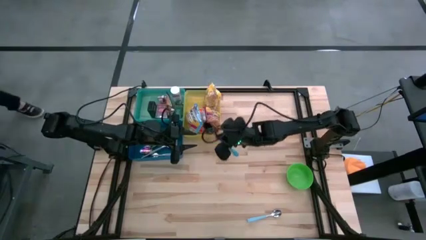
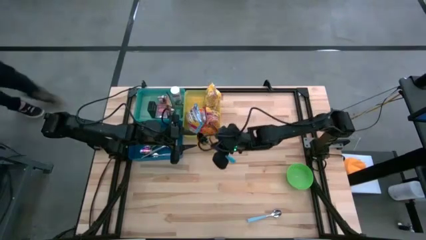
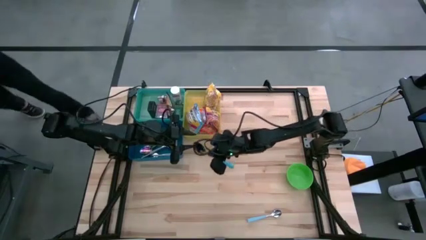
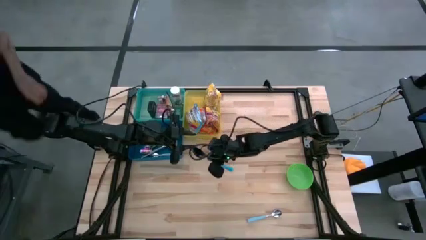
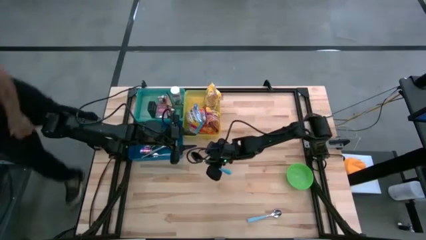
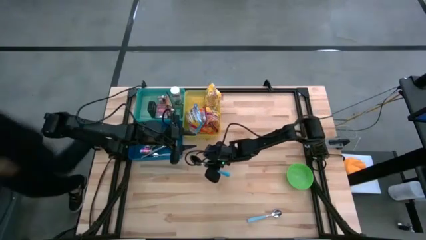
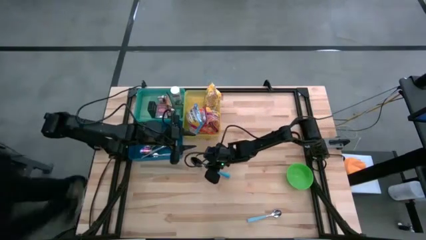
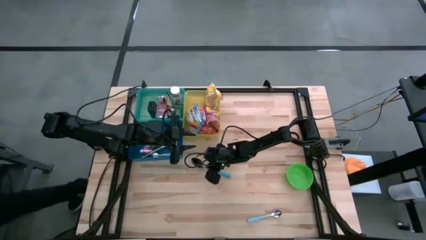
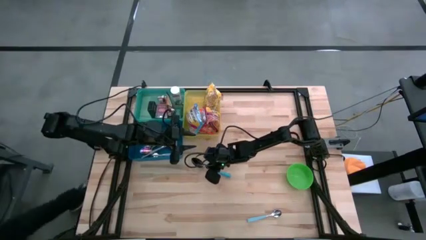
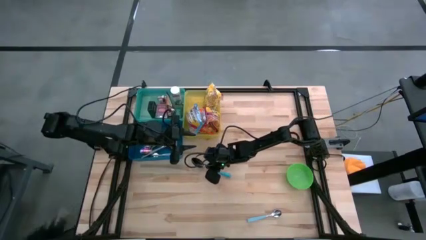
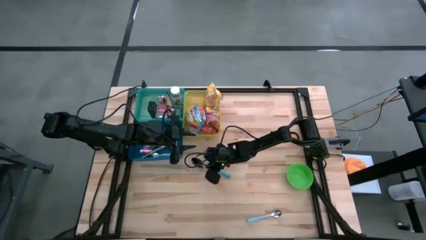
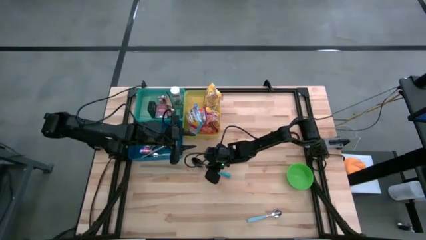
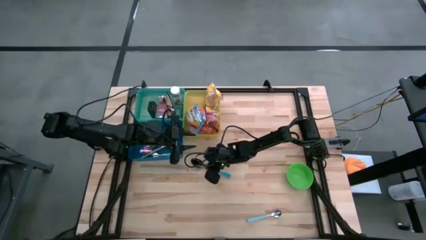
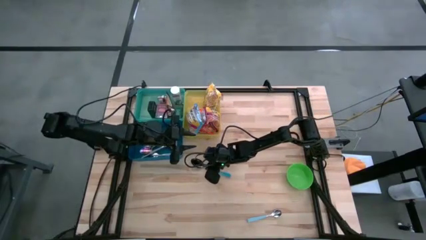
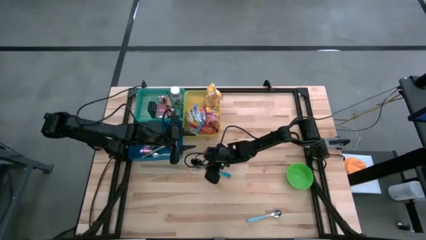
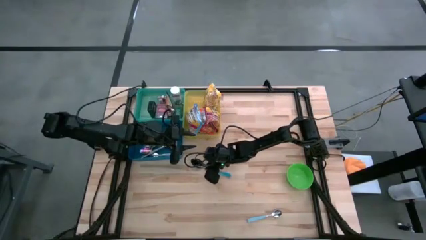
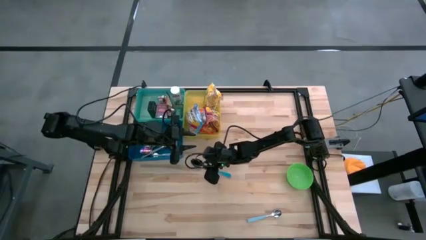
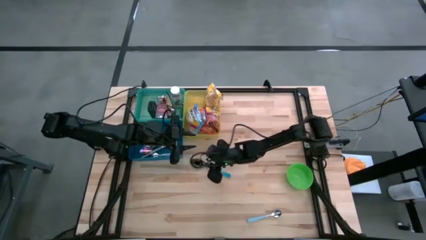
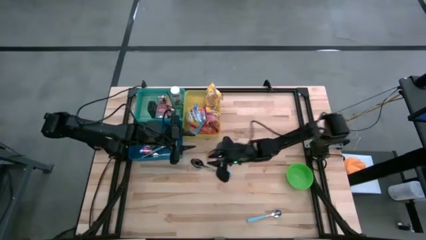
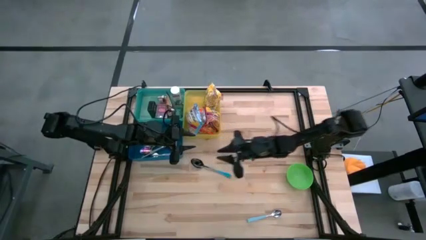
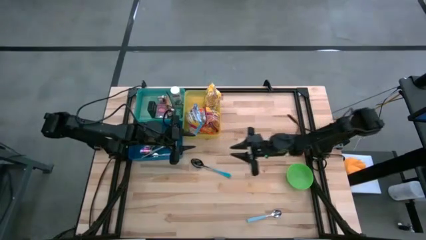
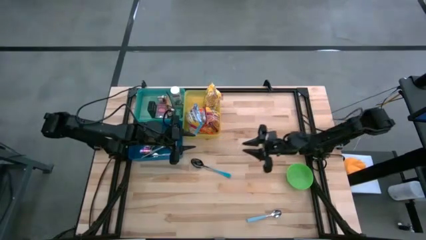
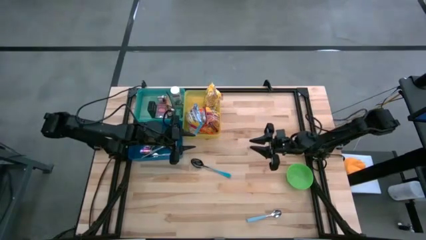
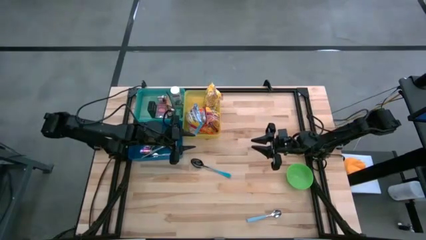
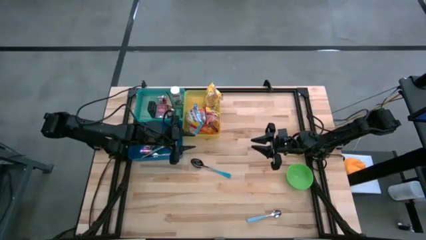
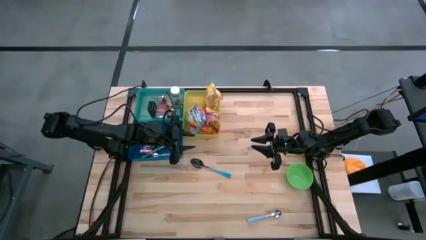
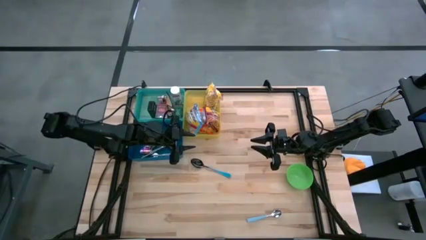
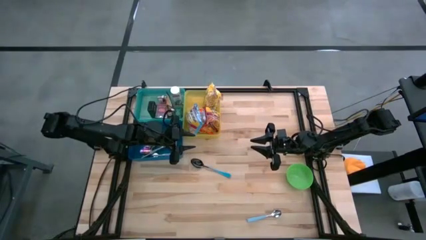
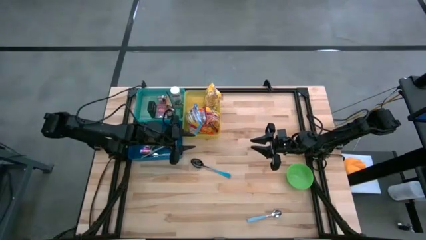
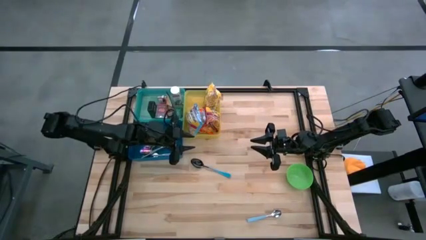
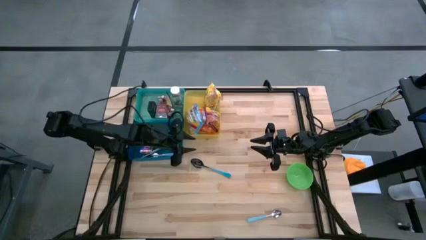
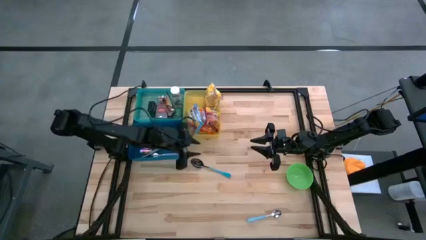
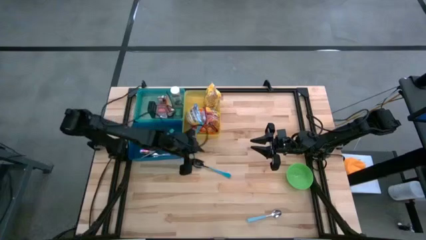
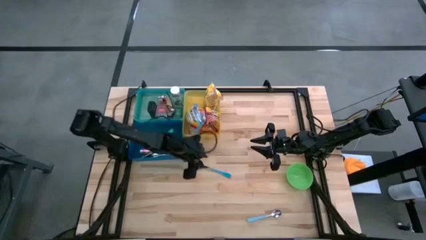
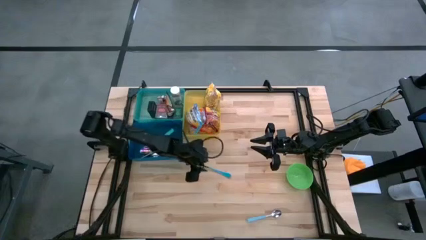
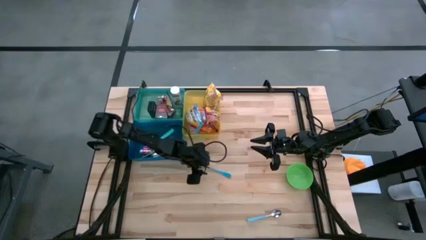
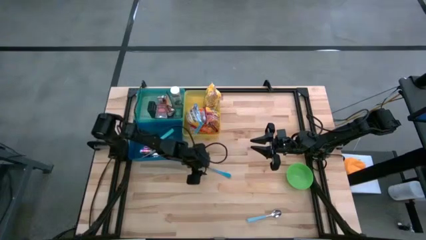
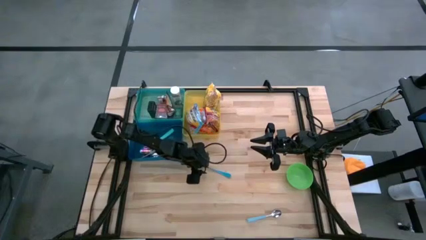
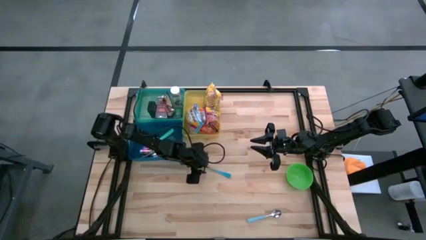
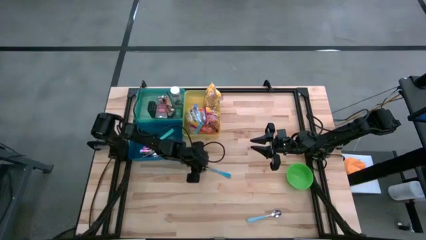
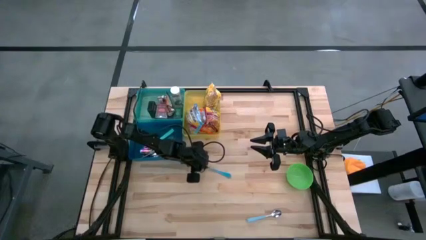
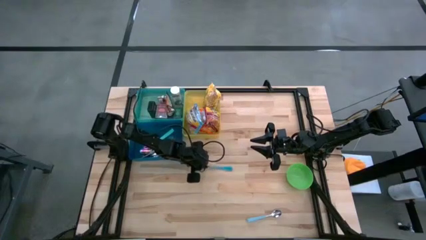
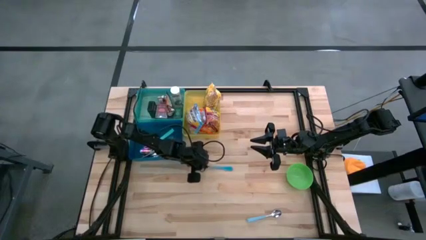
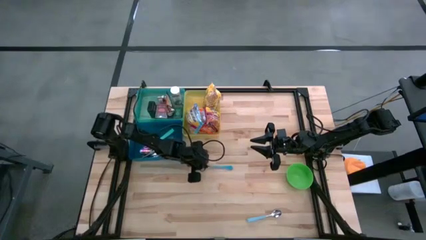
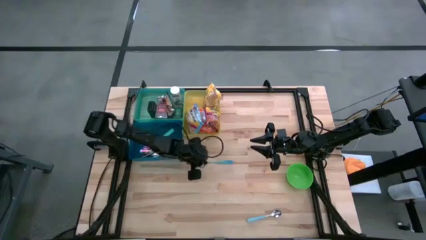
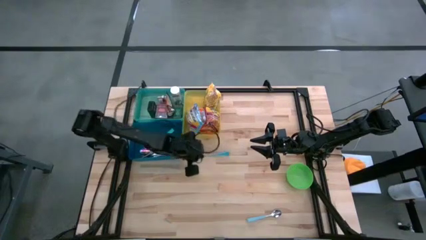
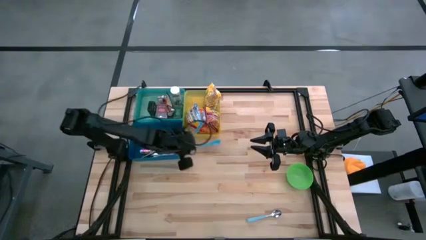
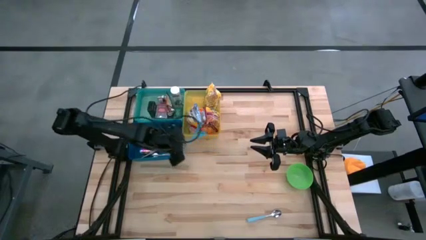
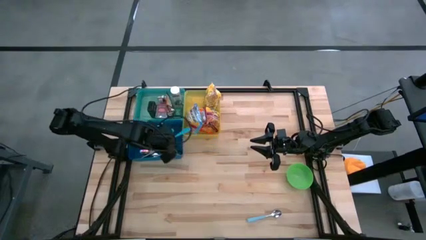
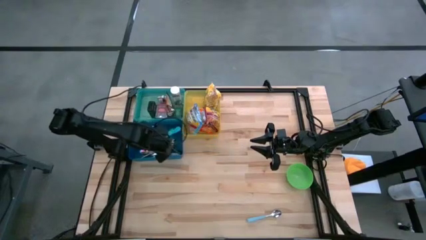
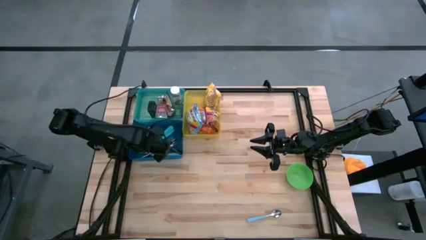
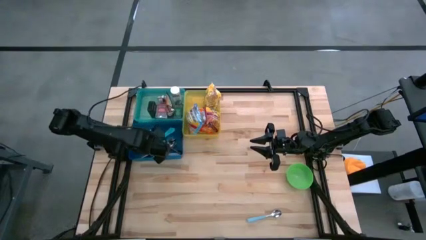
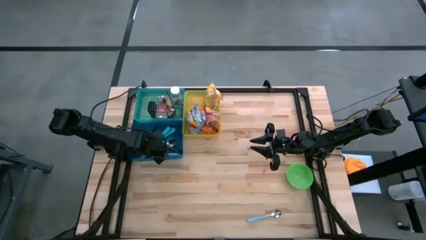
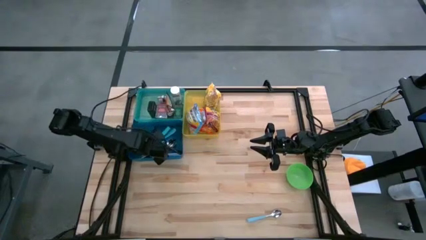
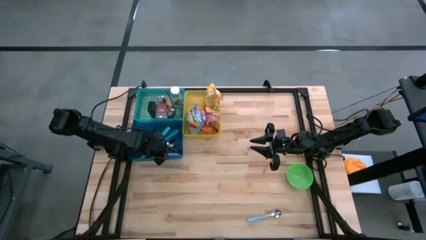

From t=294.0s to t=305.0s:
Put the blue spoon into the blue bin
